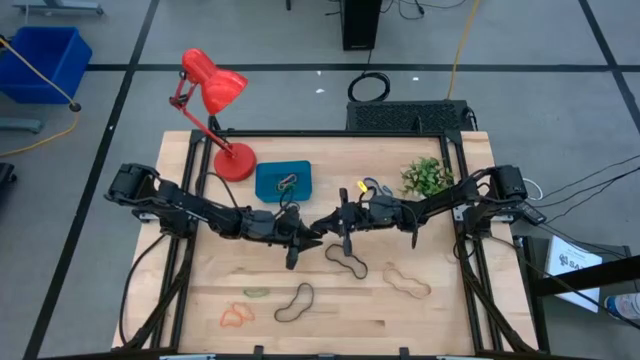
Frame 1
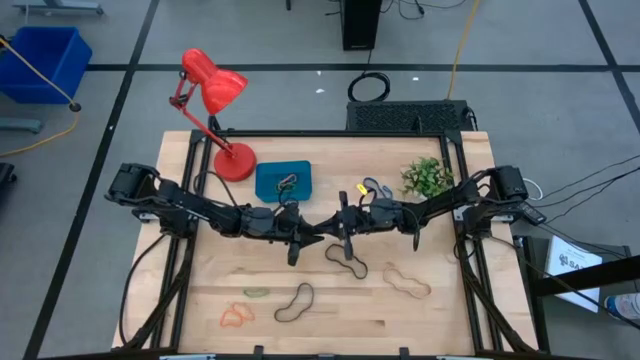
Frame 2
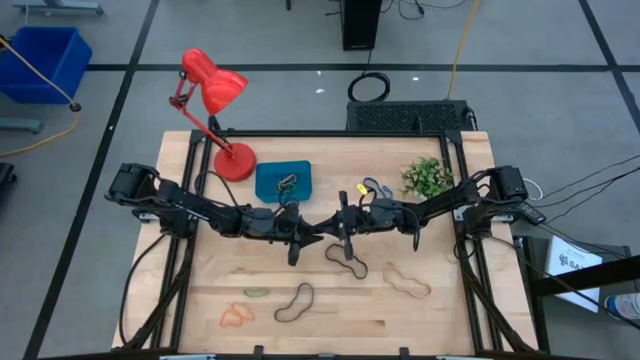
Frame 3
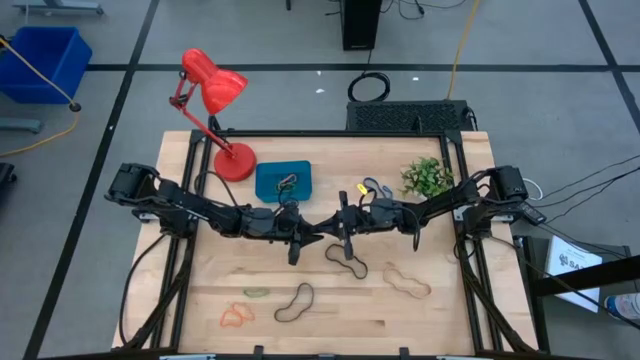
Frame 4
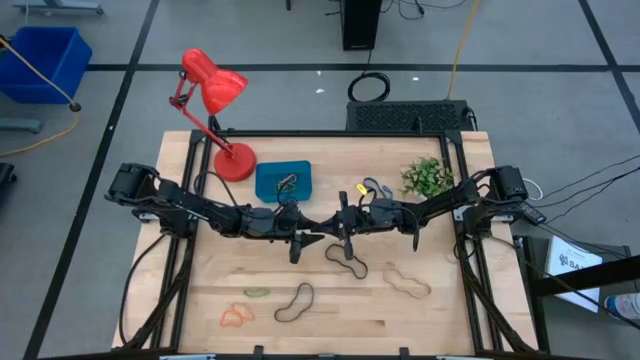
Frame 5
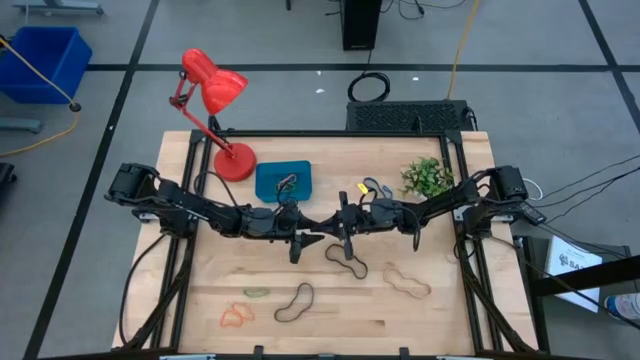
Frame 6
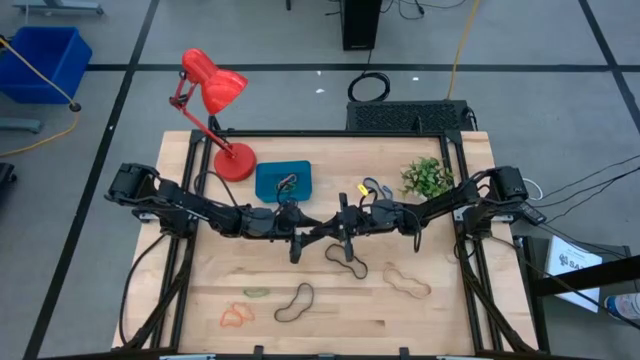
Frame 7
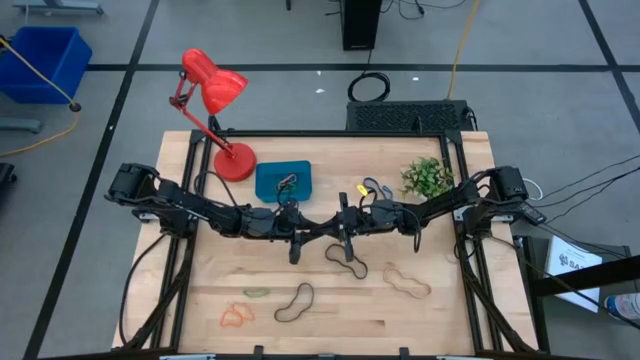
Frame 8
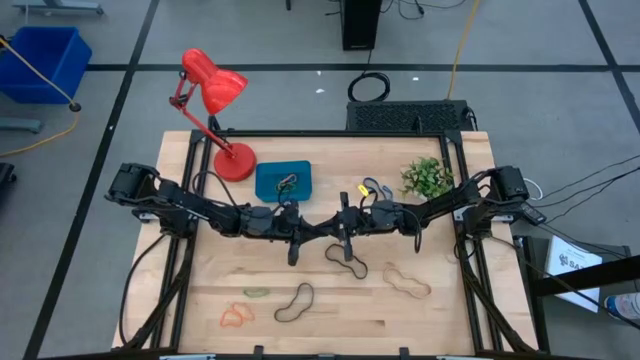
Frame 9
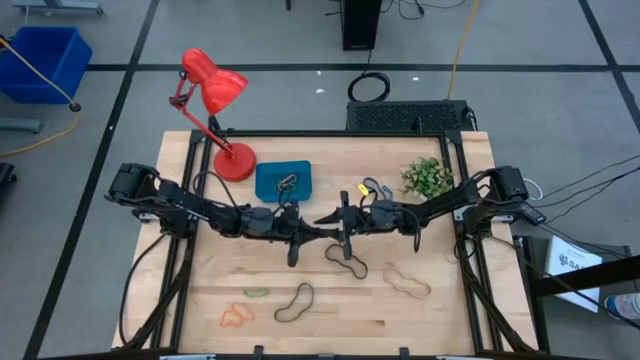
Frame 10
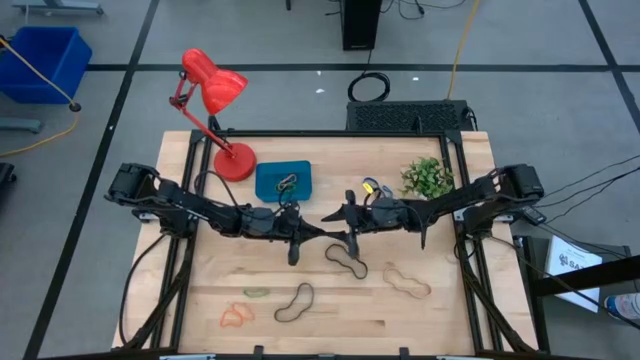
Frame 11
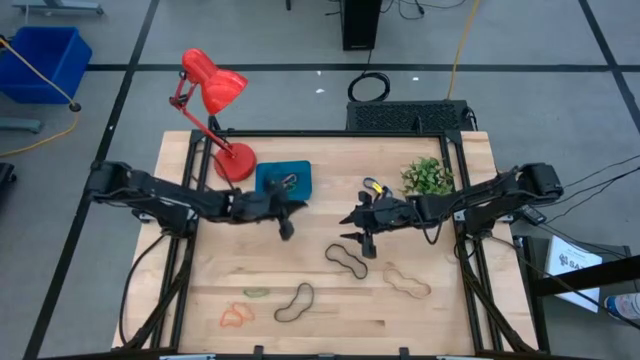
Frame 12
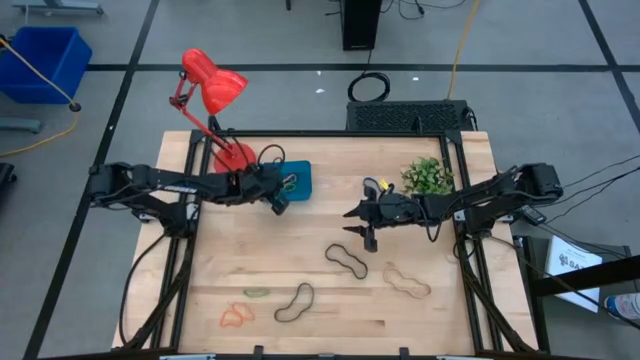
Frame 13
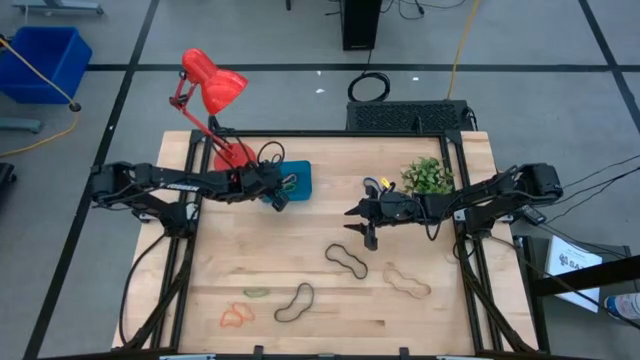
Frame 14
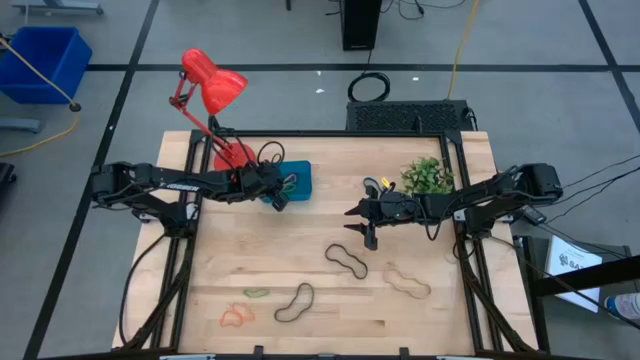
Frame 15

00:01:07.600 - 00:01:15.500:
Task: Pick and place rubber bands into bin
Put the black rubber band into the blue bin

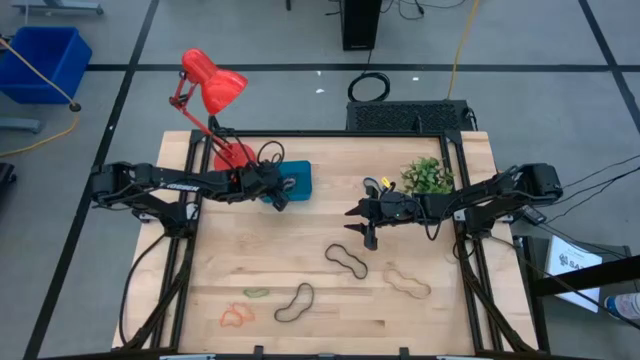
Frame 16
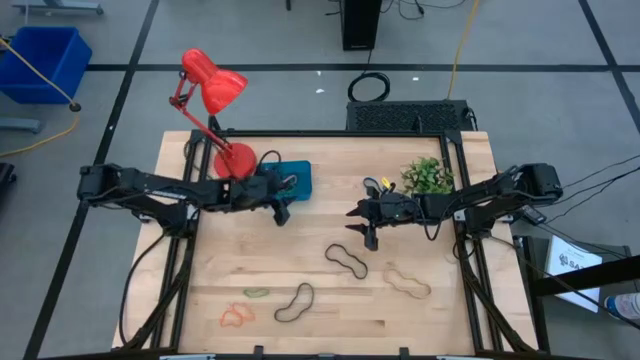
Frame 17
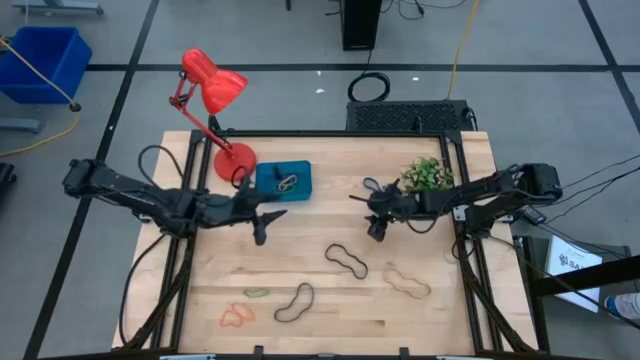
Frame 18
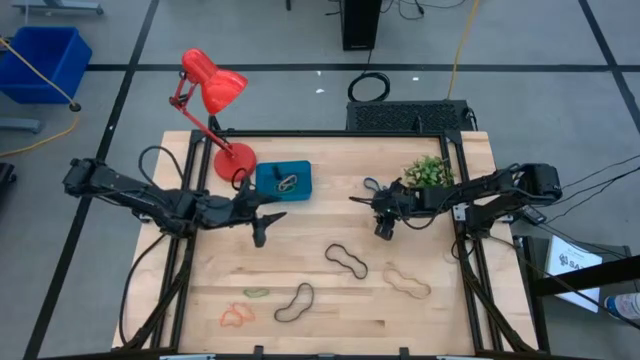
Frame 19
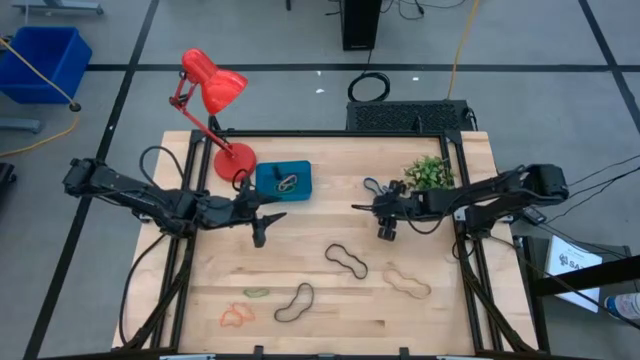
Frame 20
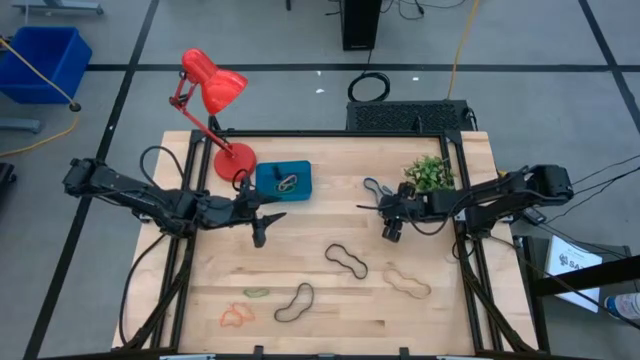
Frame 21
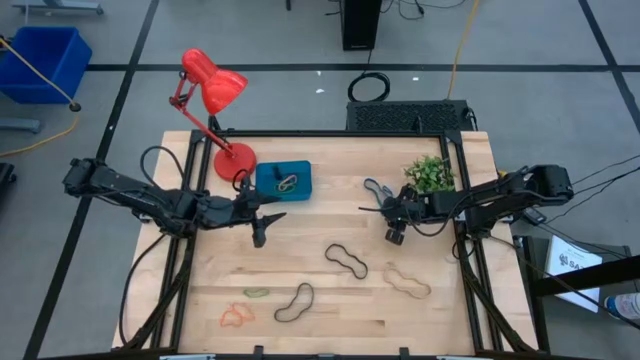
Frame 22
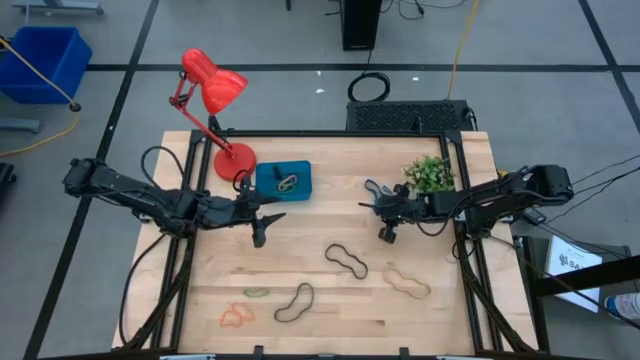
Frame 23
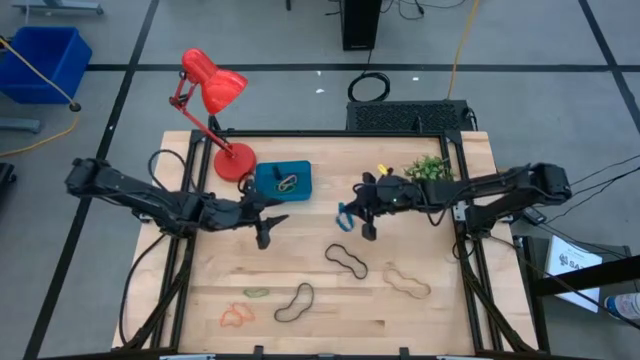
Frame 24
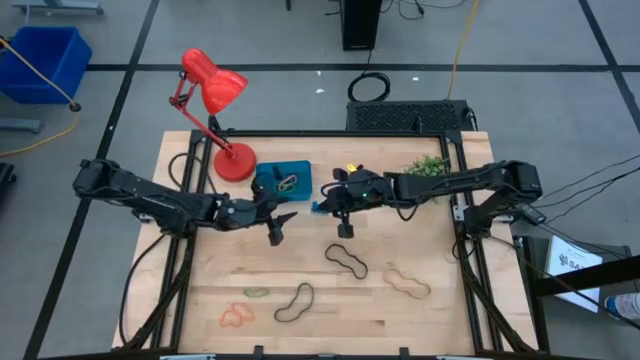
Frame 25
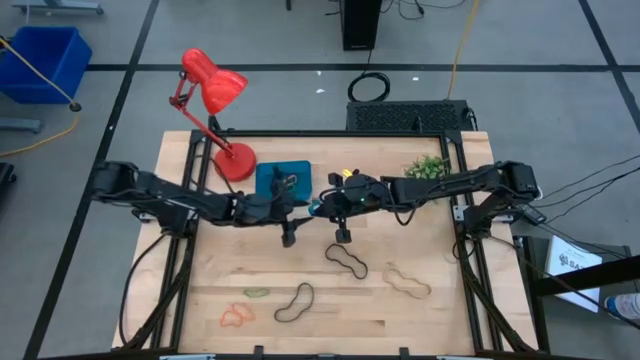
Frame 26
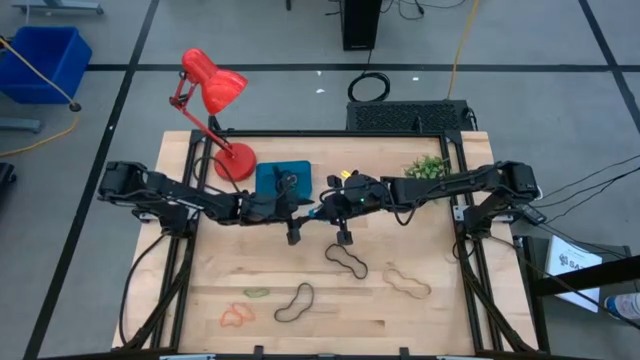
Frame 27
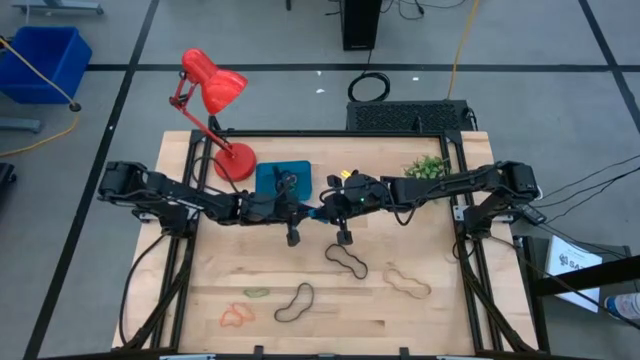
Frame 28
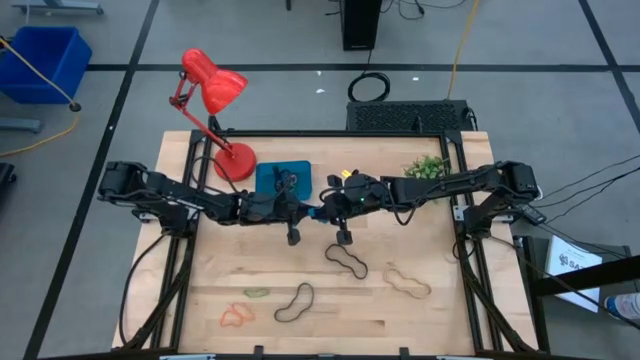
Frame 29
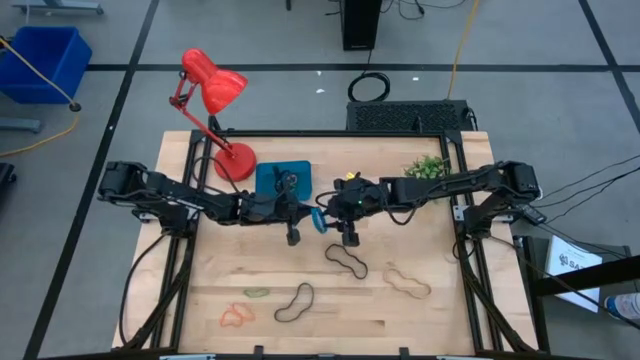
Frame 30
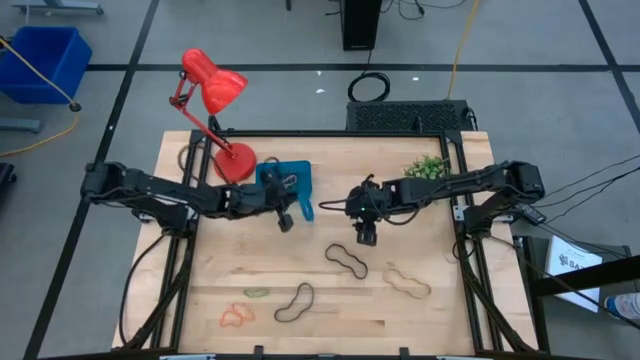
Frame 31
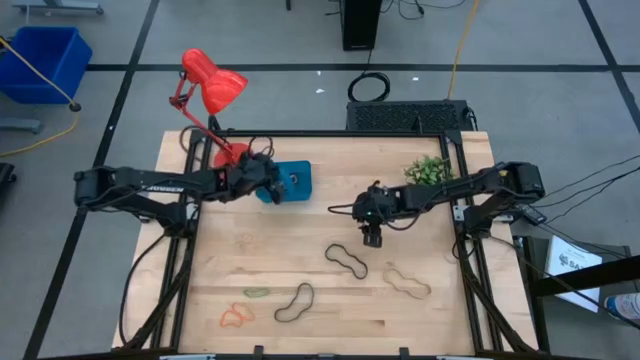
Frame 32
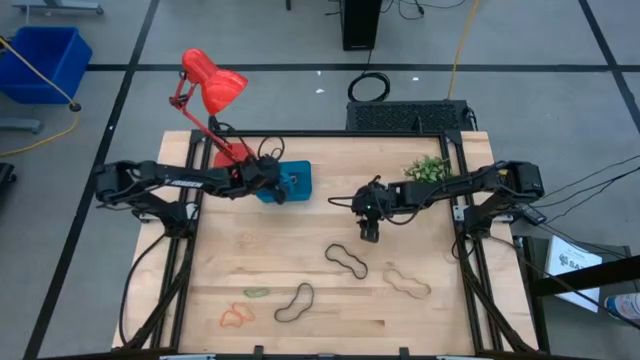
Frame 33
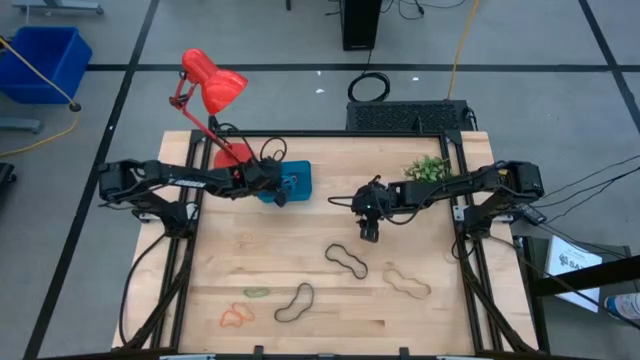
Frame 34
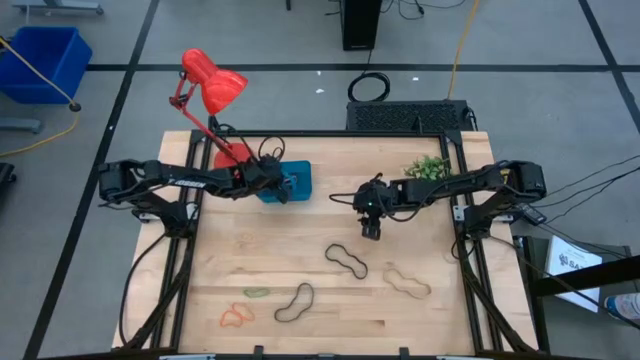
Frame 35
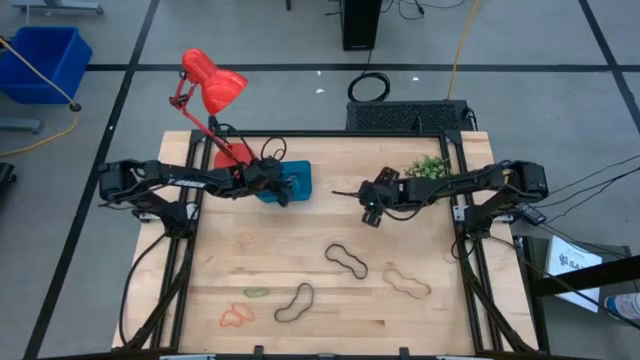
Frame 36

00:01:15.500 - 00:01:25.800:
Put the blue rubber band into the blue bin

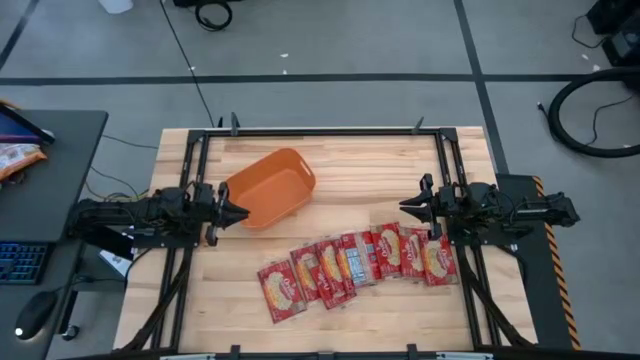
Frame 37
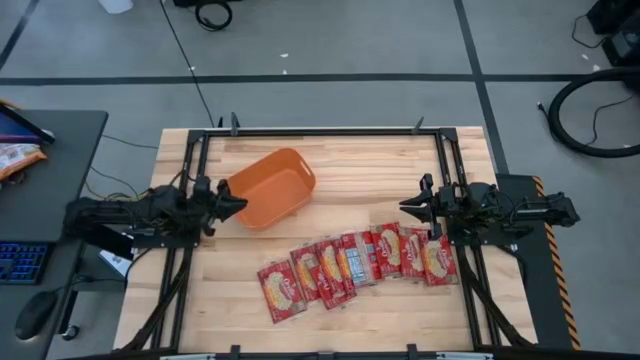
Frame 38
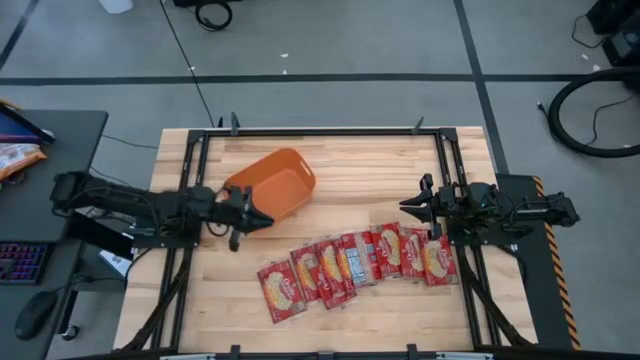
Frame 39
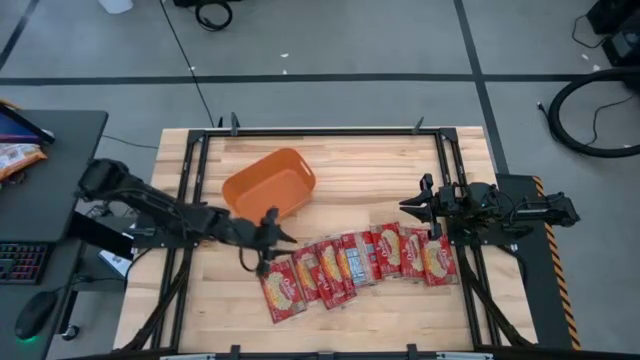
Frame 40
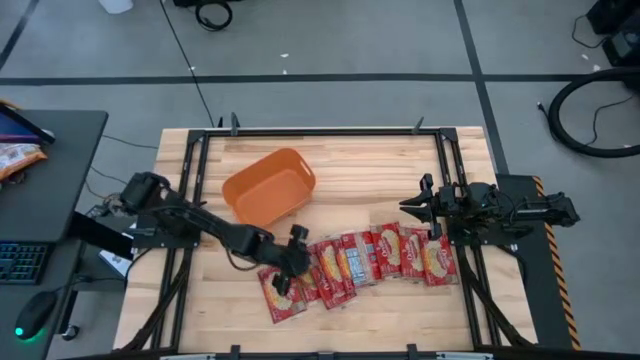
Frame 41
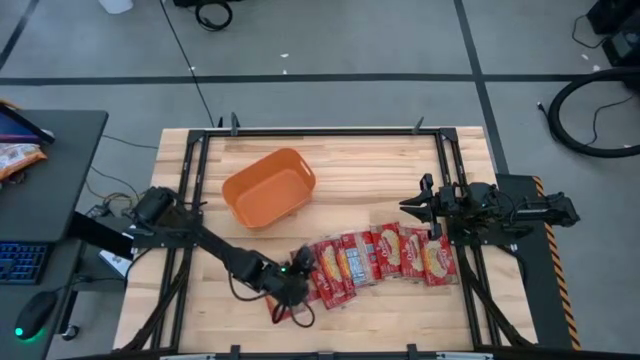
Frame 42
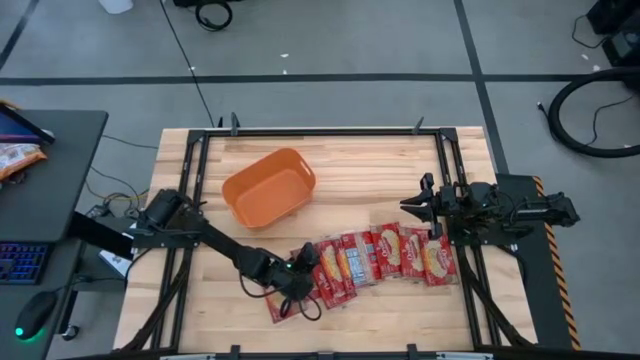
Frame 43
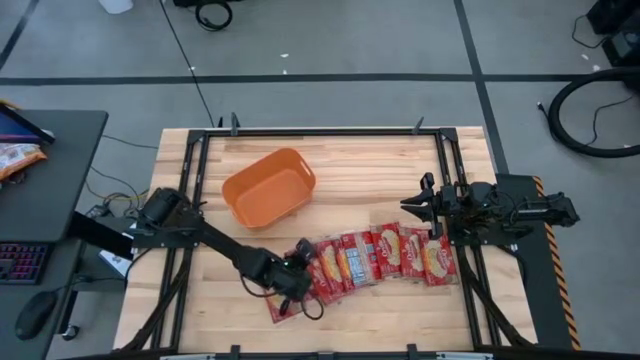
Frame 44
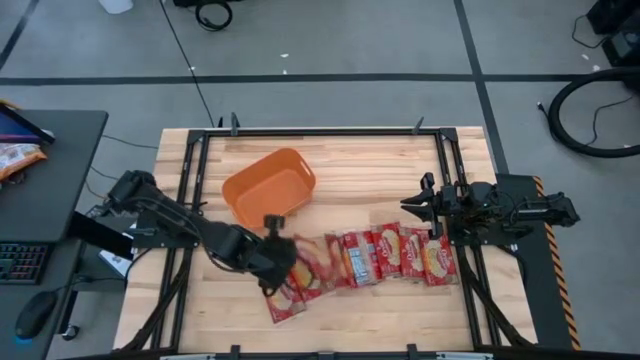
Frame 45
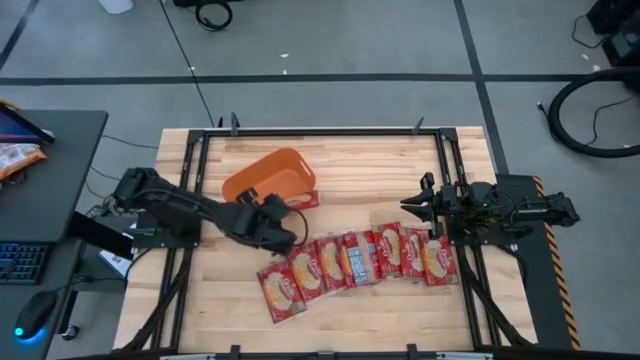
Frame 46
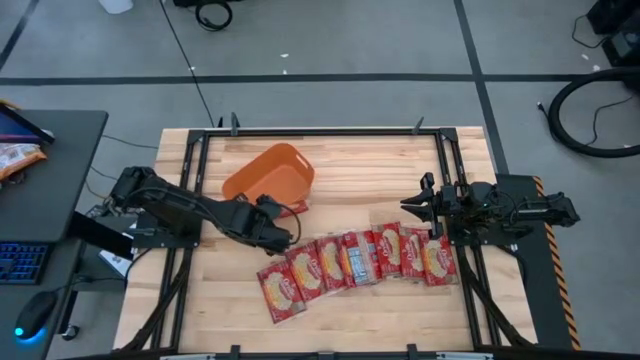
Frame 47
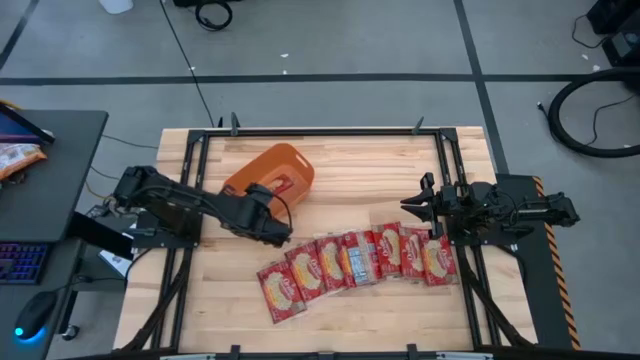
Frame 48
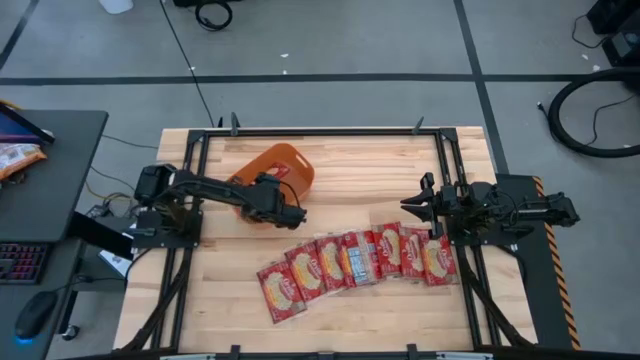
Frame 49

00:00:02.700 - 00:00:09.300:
Task: Sort popcorn bags into baskets
Put the popcorn bag into the orange bin
